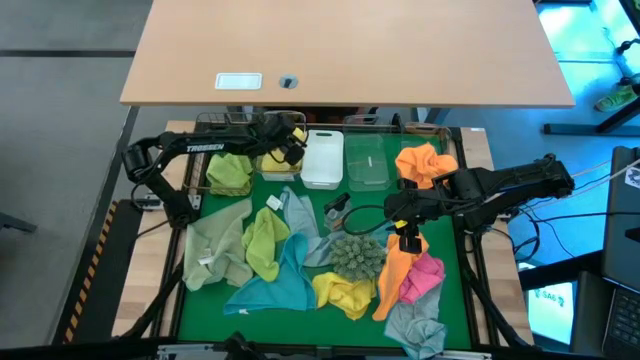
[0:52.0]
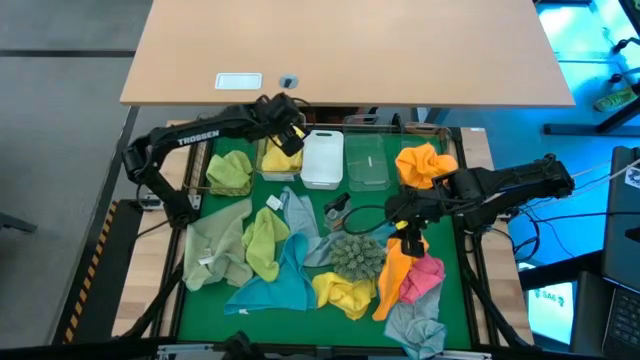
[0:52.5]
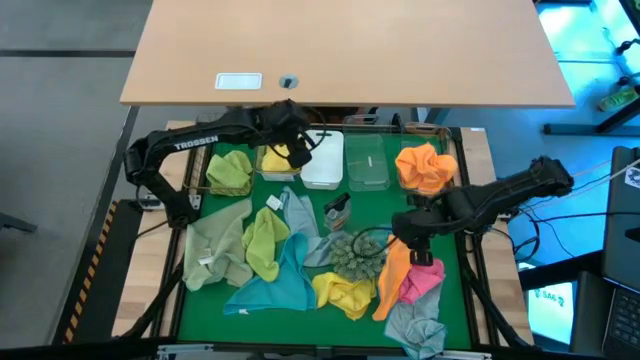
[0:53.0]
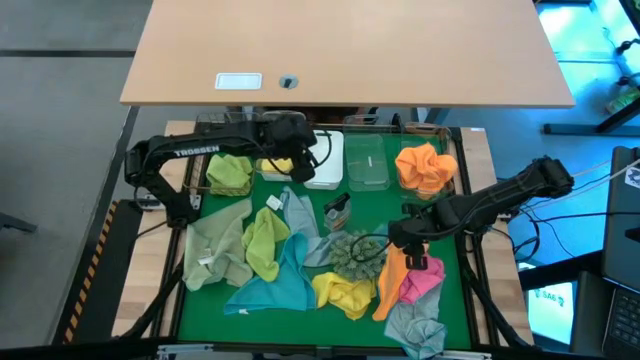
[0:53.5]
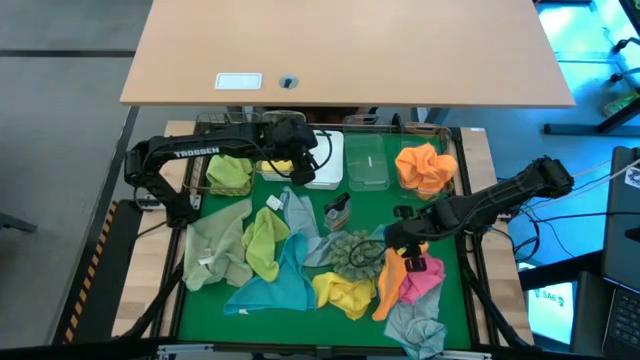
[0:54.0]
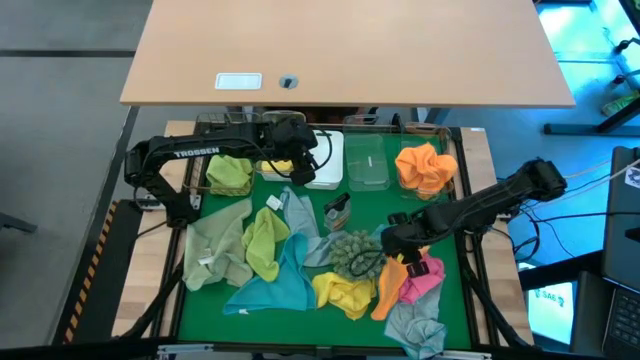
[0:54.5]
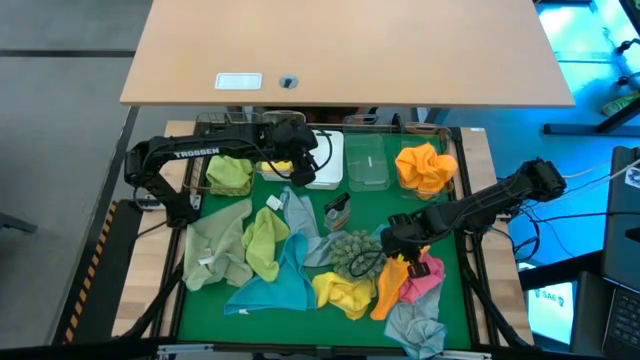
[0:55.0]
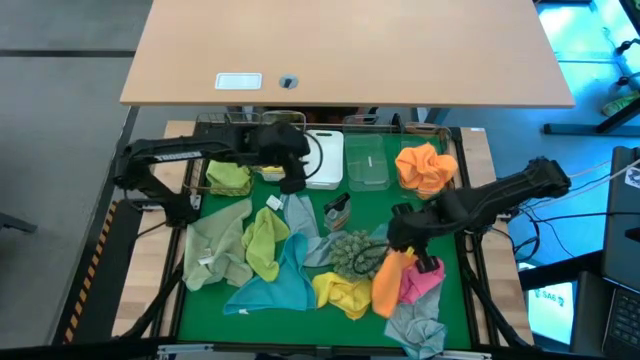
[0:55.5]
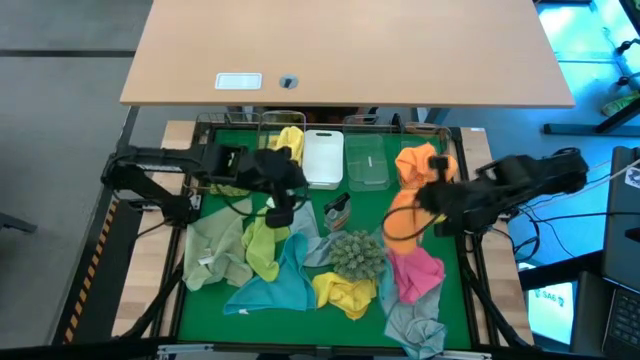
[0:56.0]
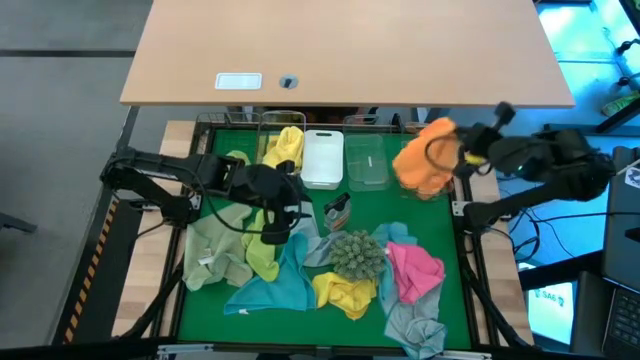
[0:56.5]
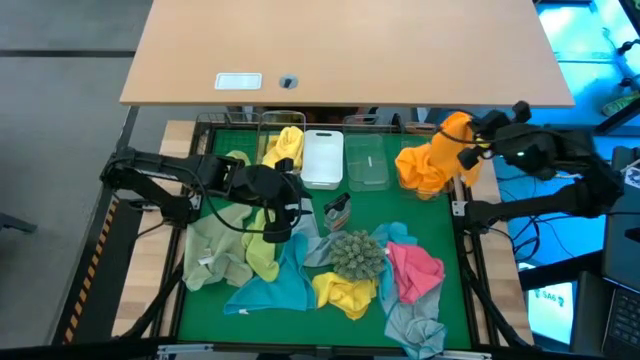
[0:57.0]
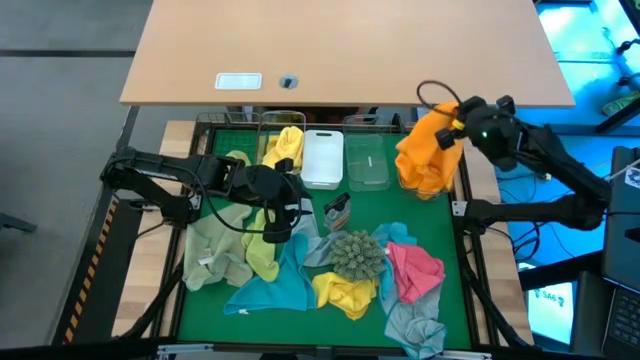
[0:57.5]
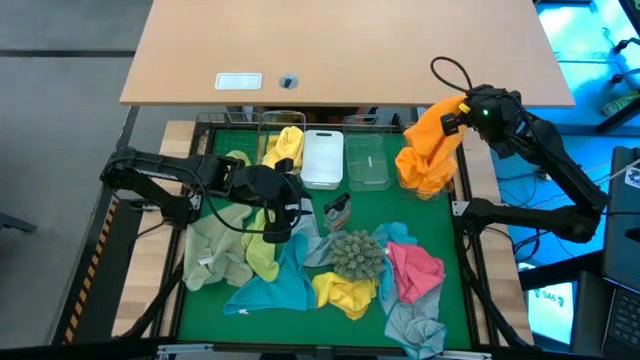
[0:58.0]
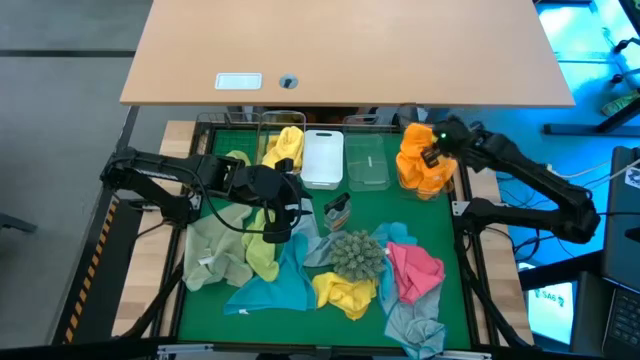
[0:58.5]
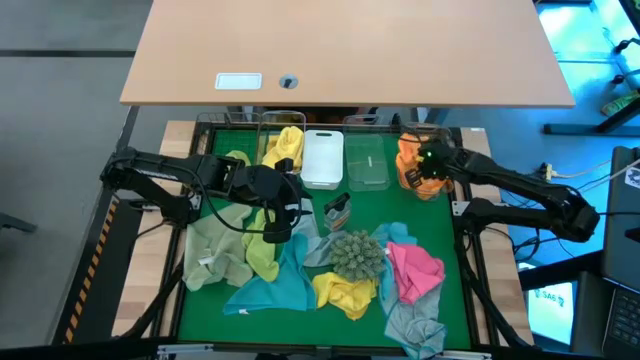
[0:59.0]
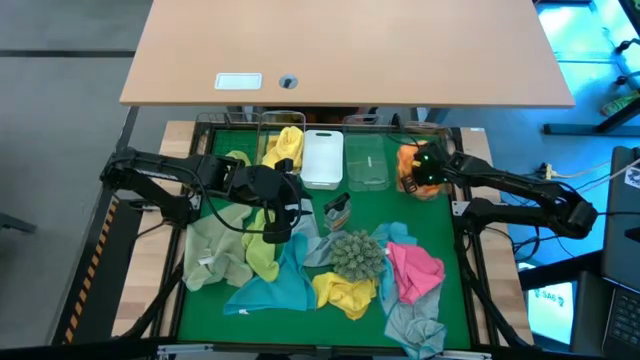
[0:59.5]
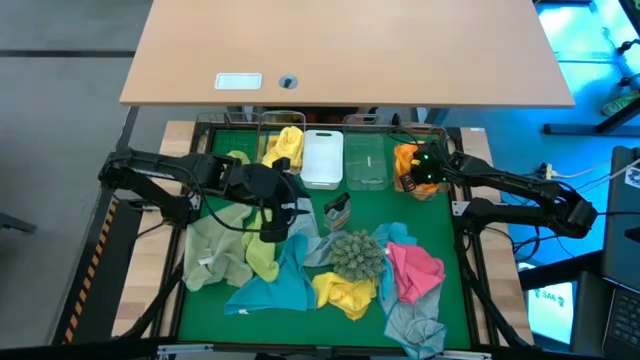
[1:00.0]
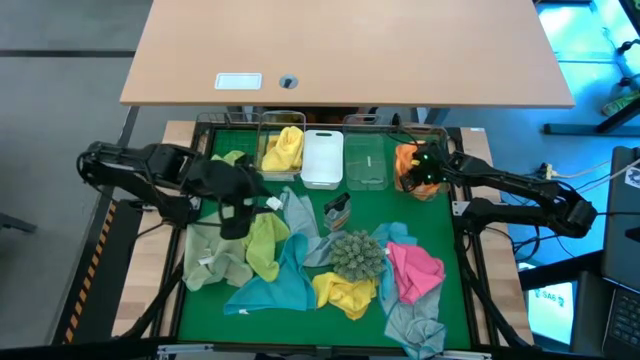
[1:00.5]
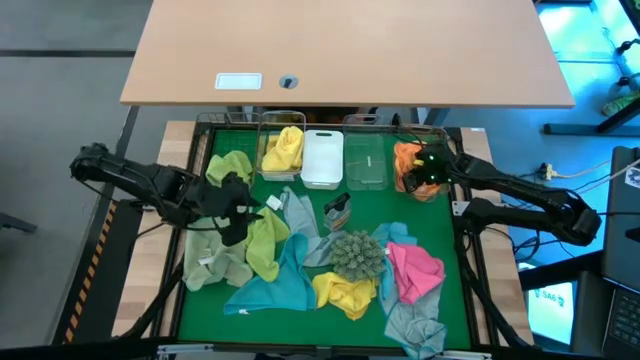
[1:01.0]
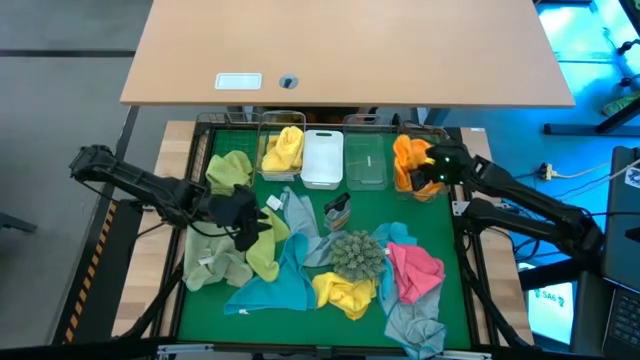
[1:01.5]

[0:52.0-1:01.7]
Task: Sort microfiber towel by color & place in baskets
Put the orange microfiber towel into the right transparent bin

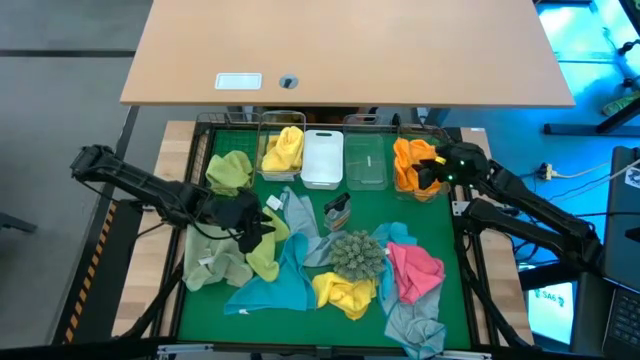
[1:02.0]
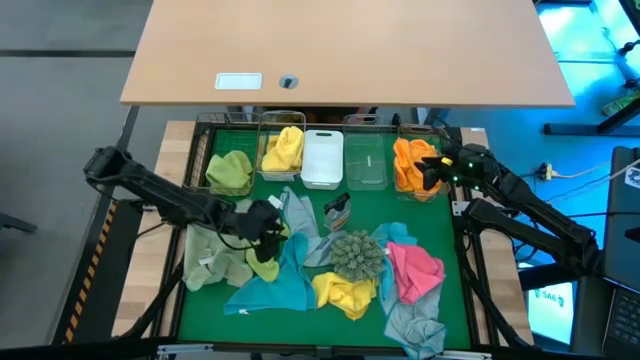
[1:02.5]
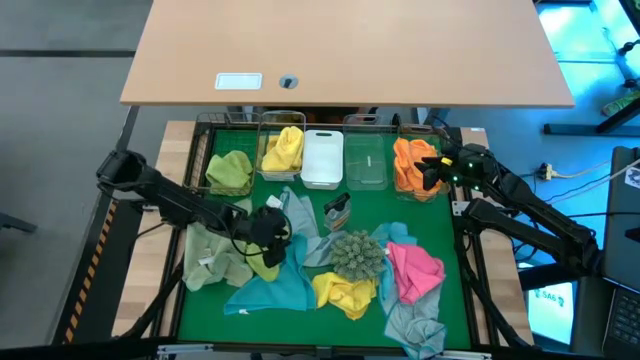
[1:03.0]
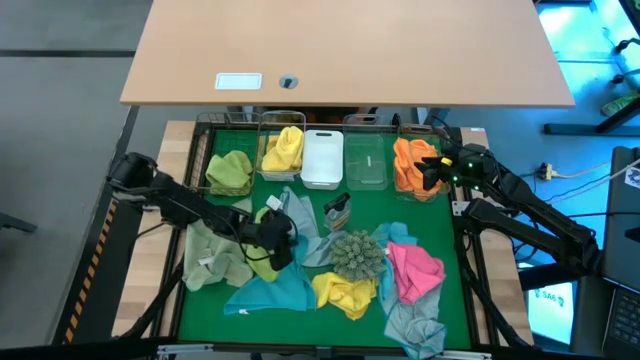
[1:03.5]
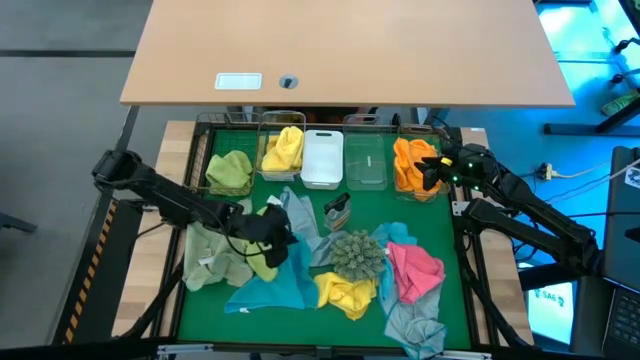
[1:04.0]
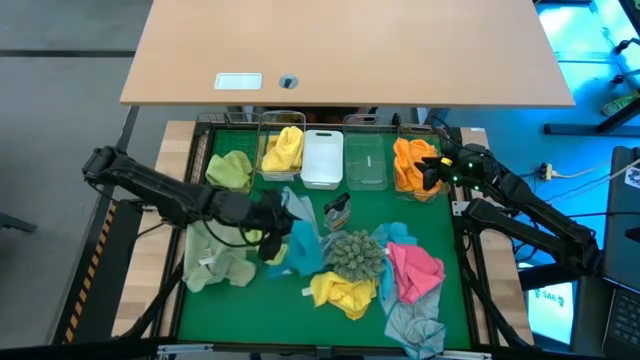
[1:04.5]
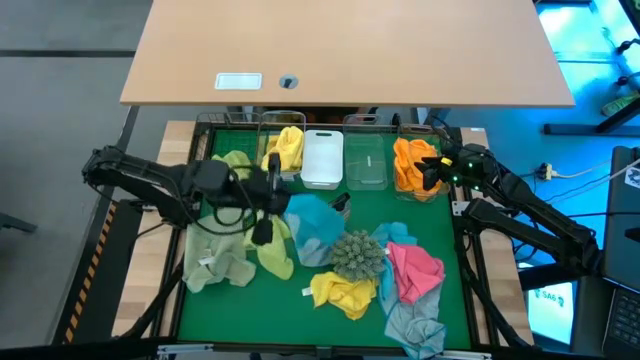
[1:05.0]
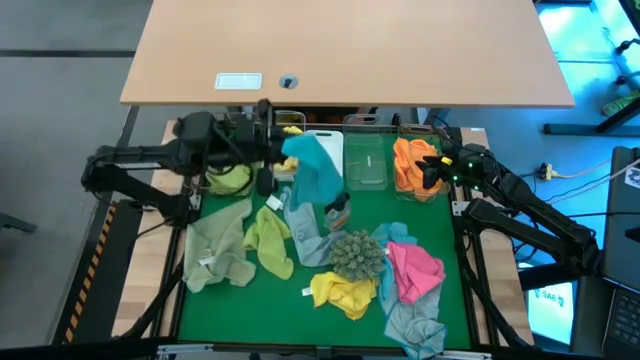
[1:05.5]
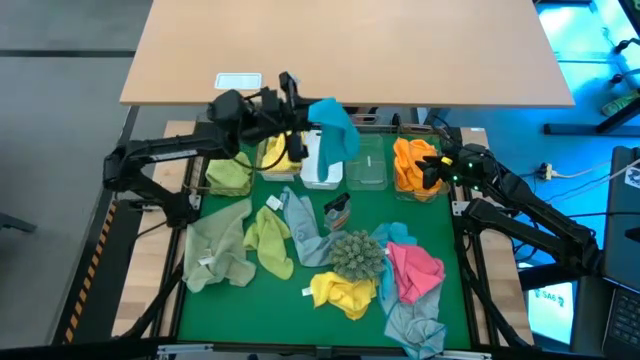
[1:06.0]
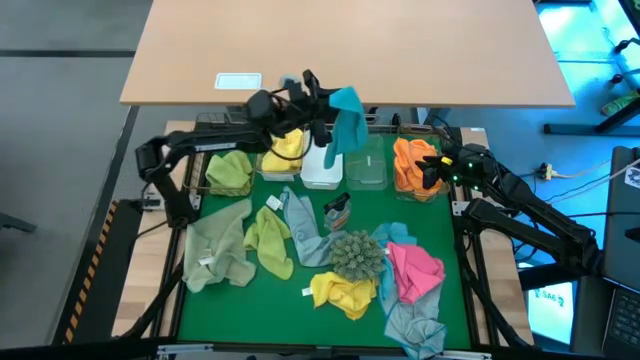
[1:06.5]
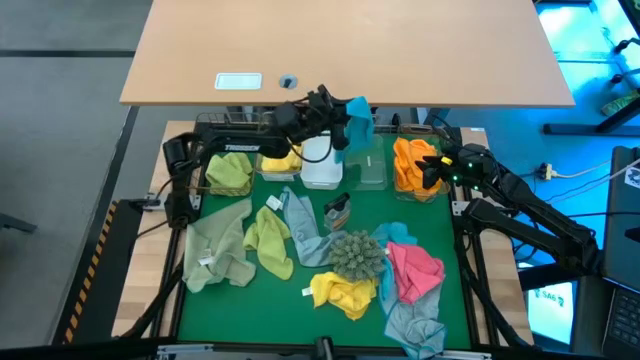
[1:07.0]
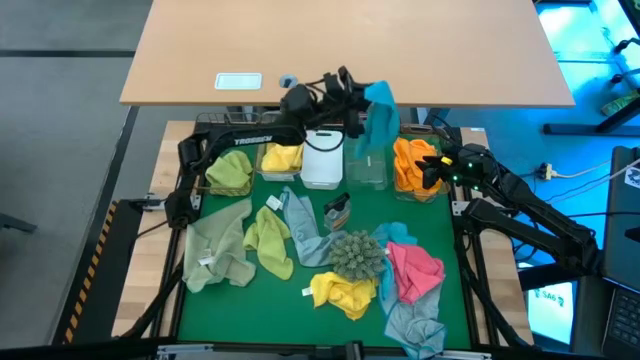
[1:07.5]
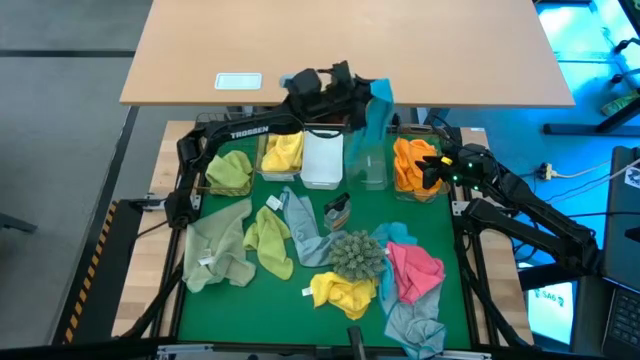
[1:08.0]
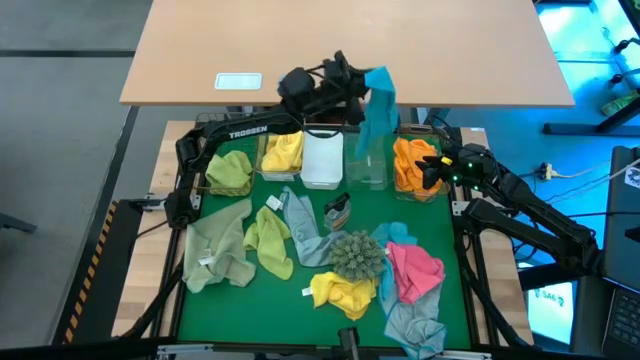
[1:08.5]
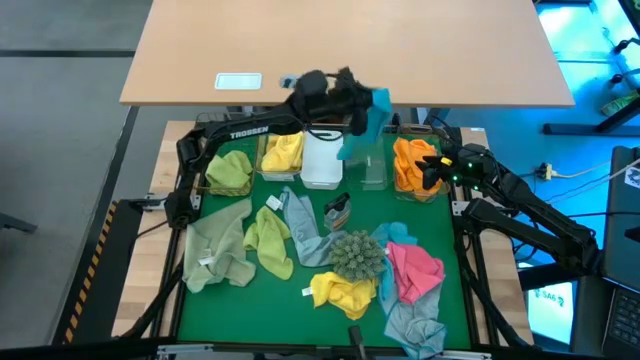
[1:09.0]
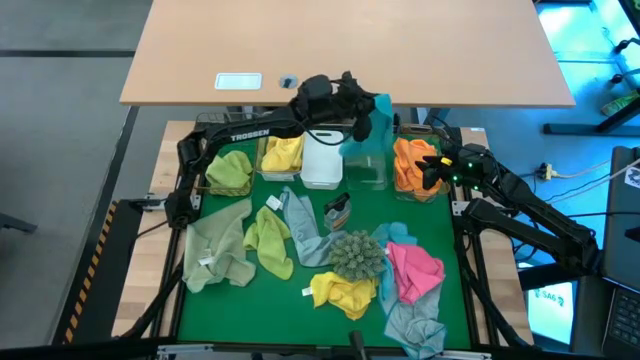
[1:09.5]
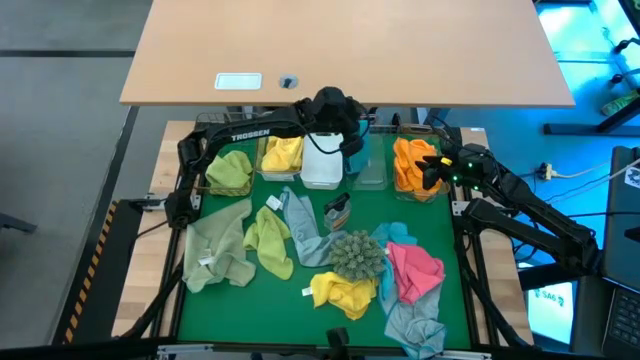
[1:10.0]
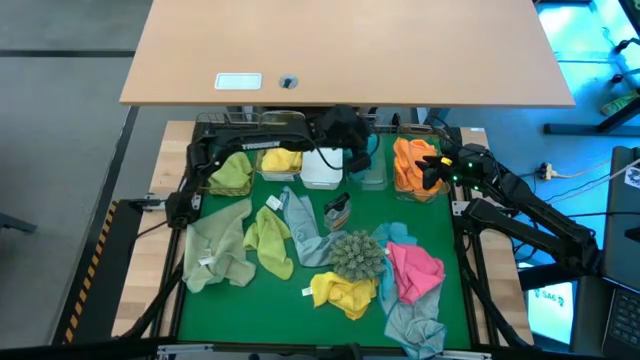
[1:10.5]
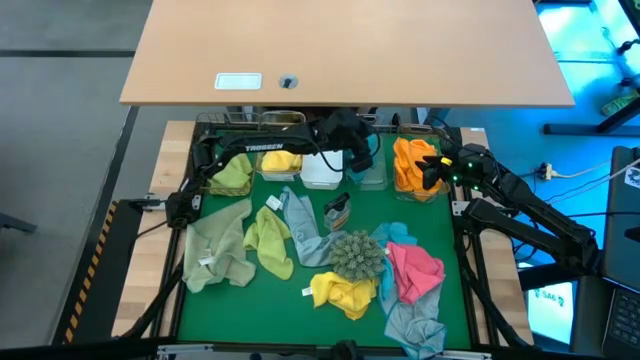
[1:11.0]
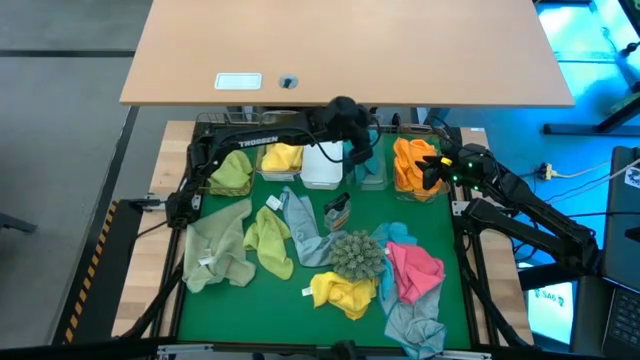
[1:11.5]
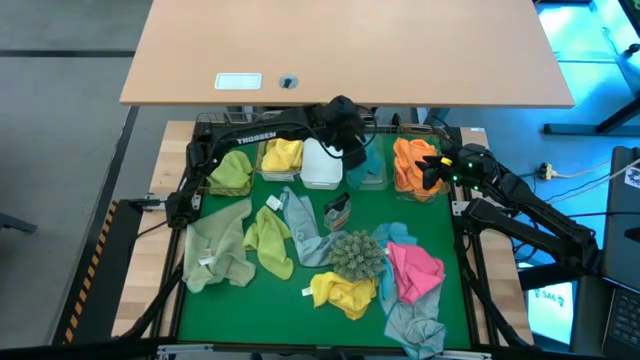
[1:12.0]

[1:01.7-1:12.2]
Put the left blue microfiber towel into the middle transparent bin

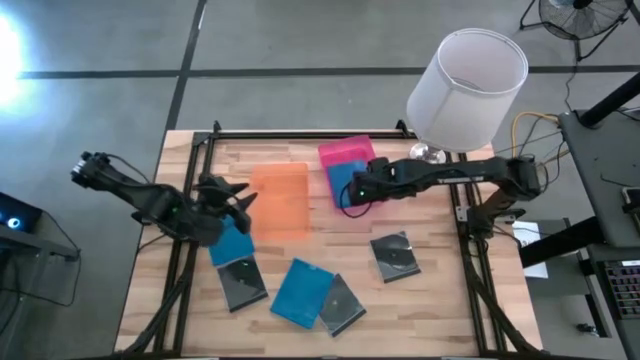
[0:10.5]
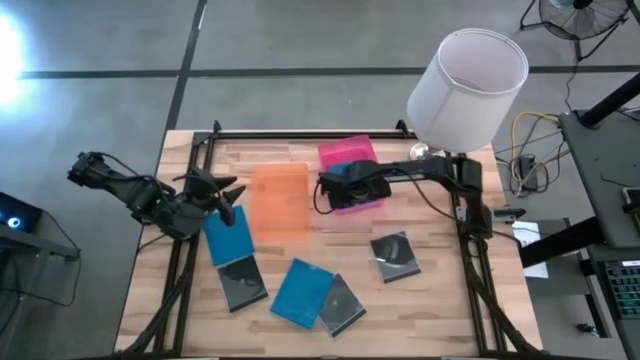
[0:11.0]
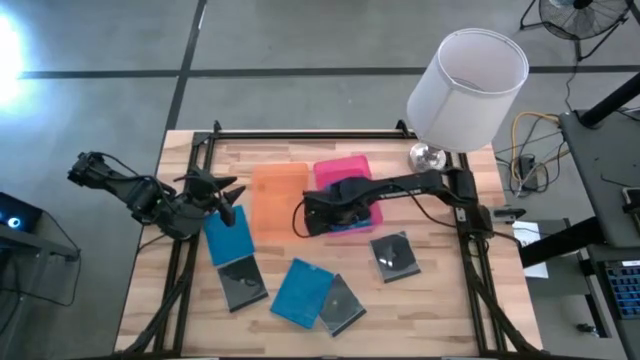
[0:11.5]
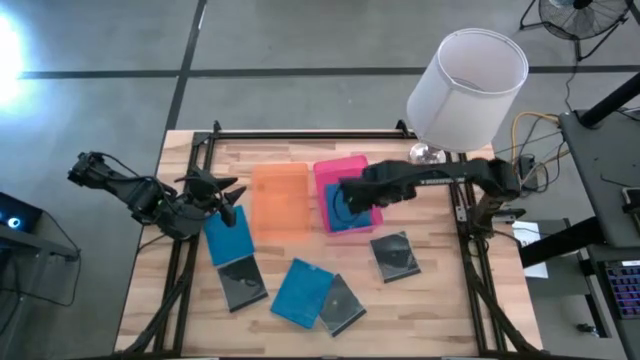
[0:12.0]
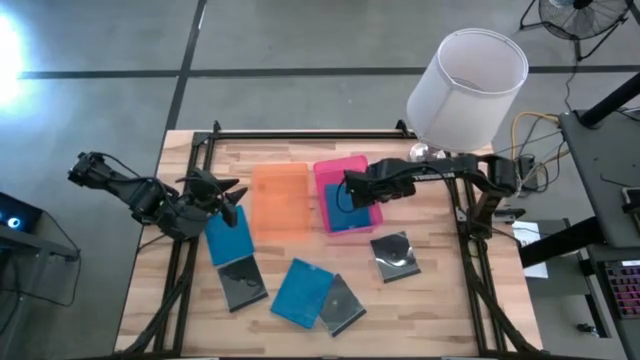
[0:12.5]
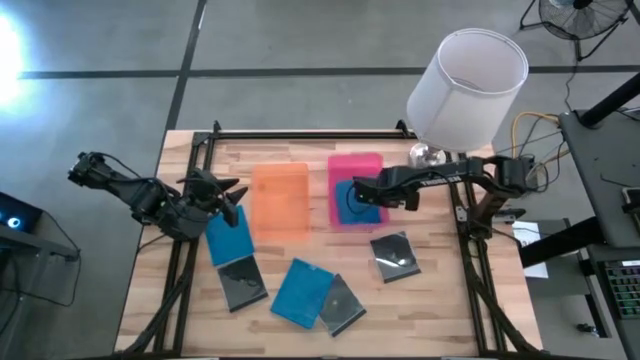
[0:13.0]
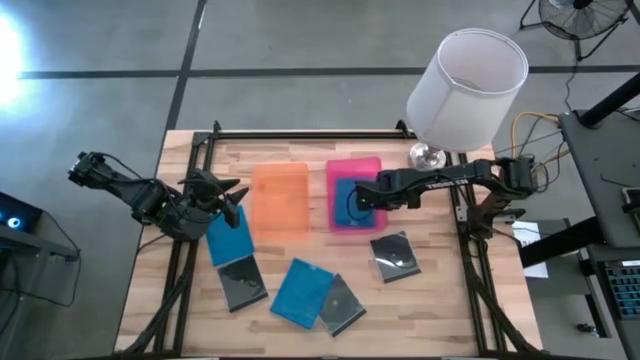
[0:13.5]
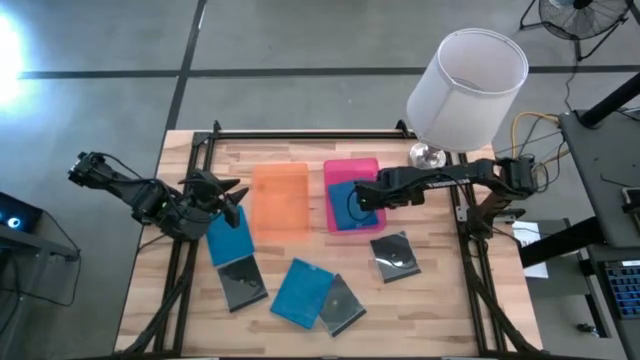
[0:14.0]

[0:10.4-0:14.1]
Task: Pick & place jewel cases by type
Adjust the pink bin
